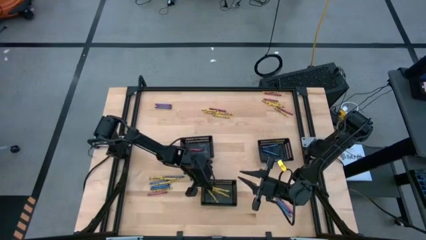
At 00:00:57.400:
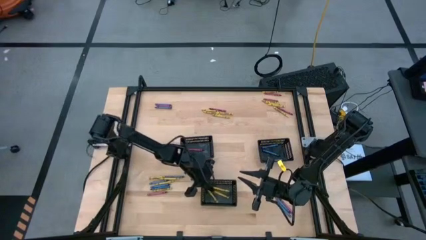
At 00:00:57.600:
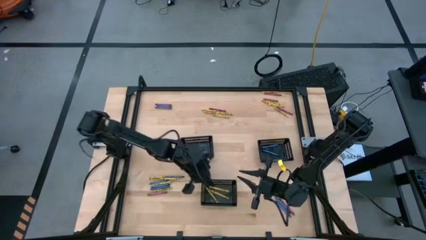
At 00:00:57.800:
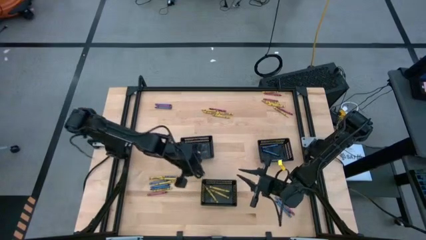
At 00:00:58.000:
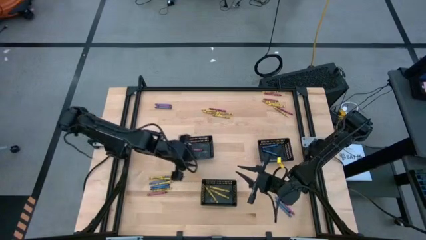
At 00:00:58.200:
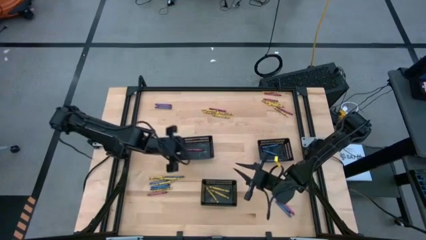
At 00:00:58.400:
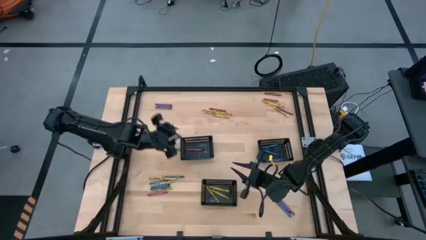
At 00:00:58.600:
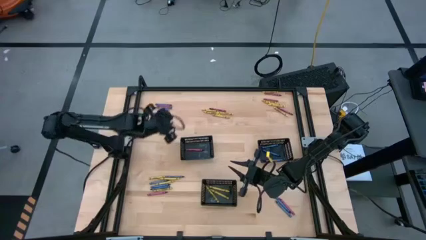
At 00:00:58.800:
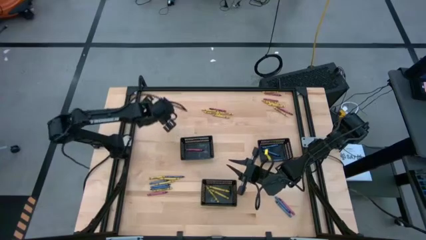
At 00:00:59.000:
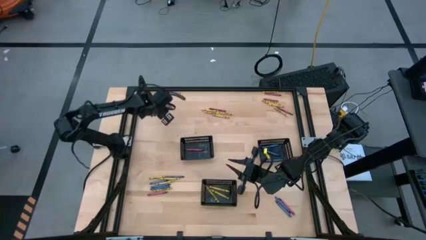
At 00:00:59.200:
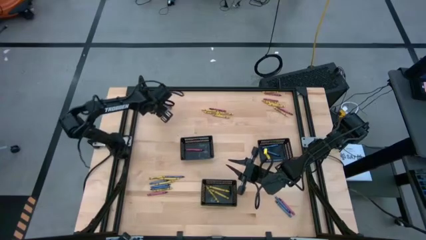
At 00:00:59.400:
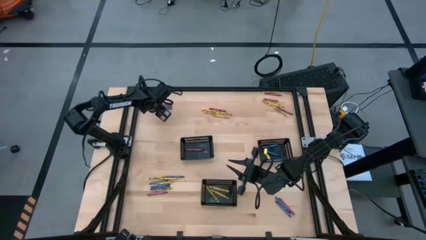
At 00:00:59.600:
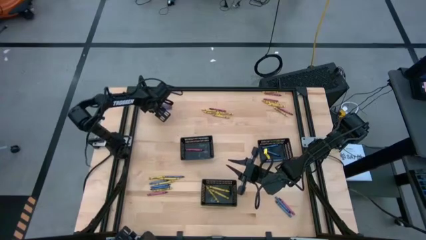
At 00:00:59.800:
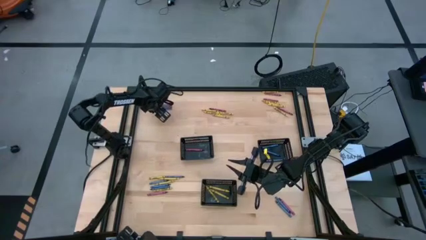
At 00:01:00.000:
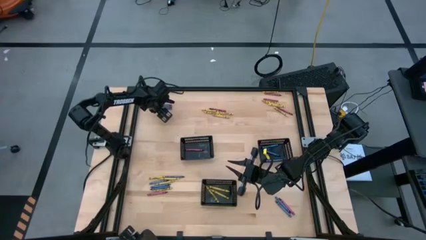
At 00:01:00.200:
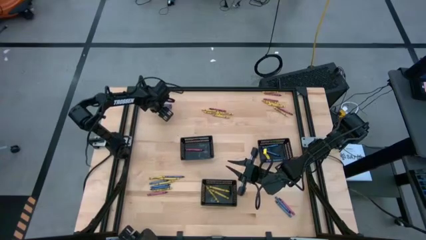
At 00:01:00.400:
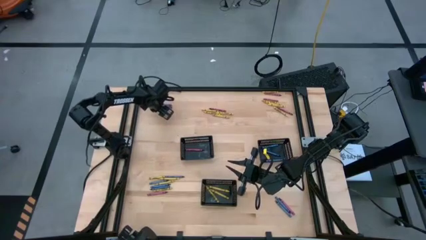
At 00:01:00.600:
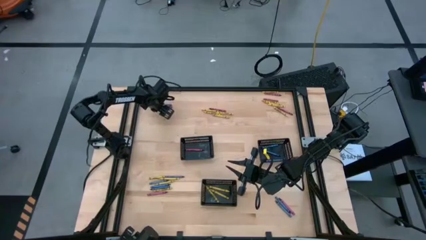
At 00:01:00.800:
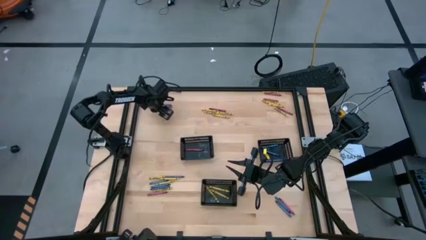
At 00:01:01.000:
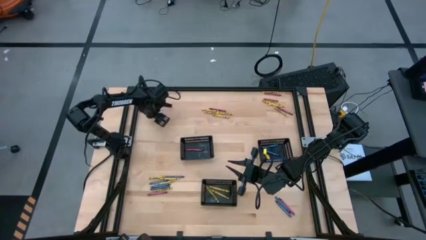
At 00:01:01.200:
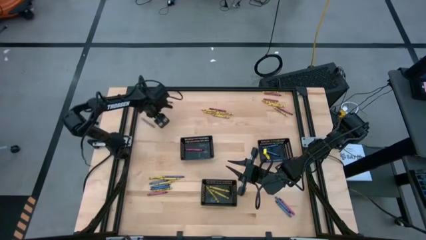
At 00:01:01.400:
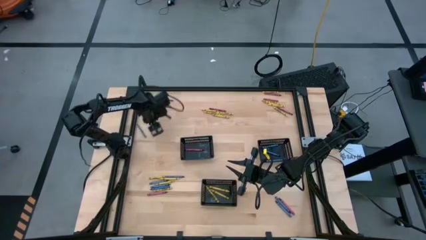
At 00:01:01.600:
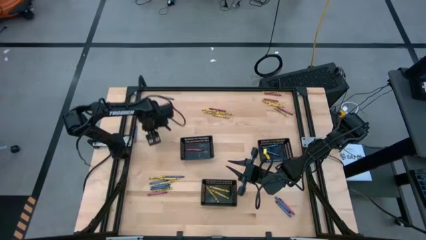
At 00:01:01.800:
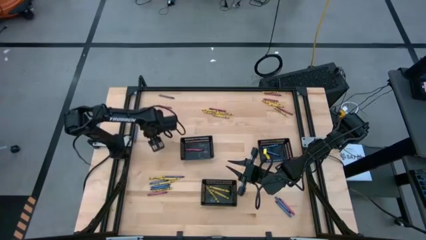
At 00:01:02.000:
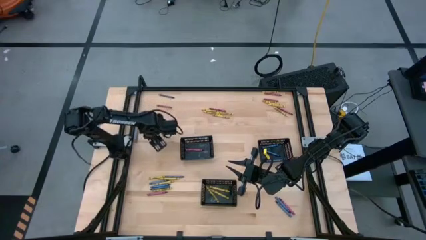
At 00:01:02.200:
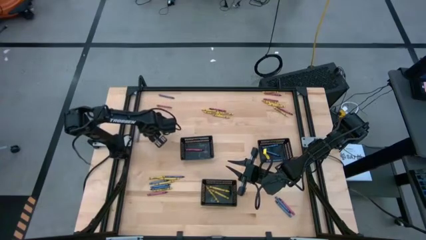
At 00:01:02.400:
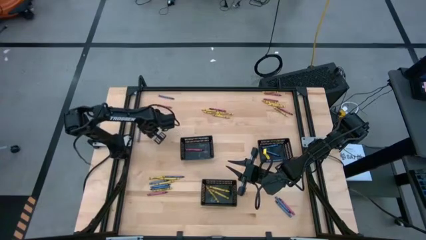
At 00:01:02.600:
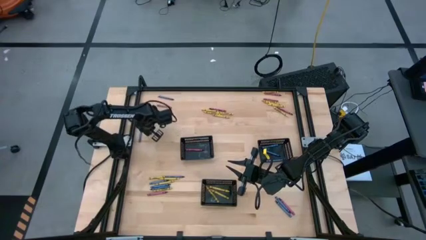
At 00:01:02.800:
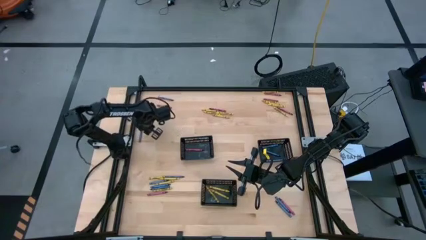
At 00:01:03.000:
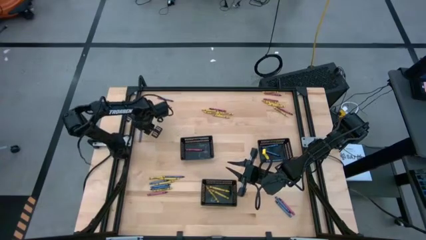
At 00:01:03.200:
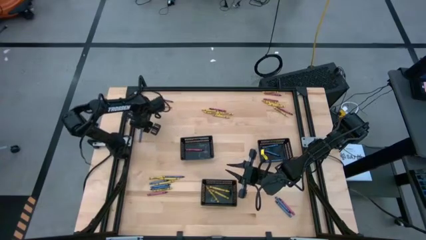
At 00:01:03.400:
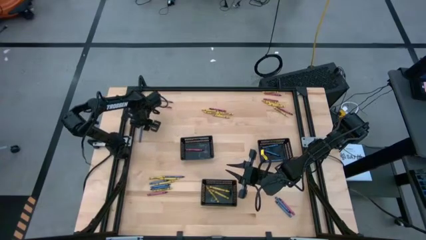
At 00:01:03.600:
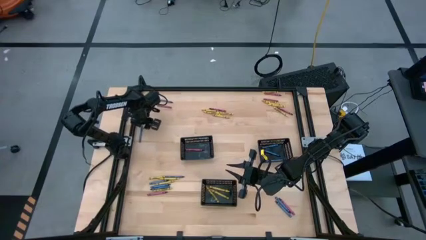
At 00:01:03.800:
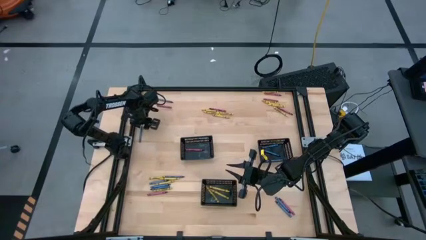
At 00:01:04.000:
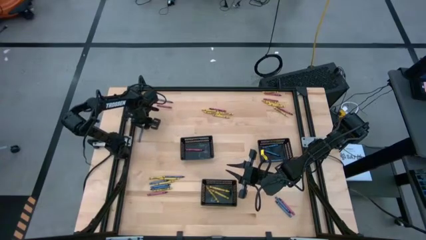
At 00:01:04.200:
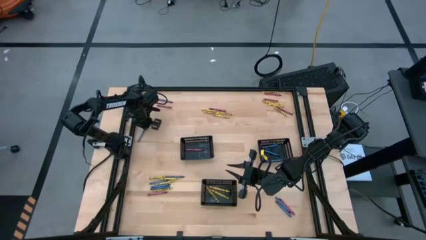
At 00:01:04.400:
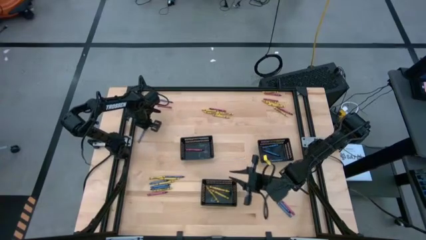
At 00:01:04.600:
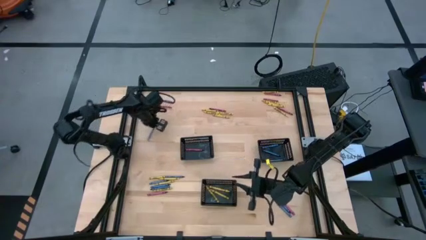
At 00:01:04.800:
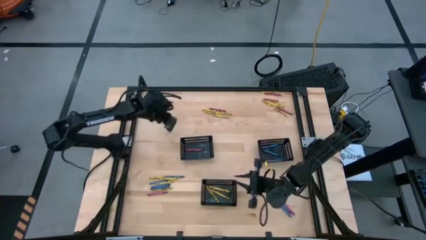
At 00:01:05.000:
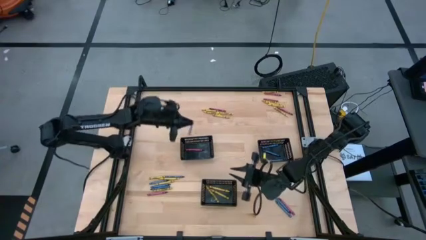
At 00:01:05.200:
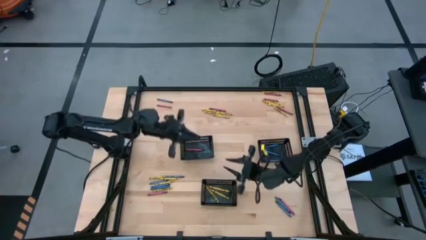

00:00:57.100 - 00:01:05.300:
Task: Sort crayons
Put the blue crayon into the right black bin

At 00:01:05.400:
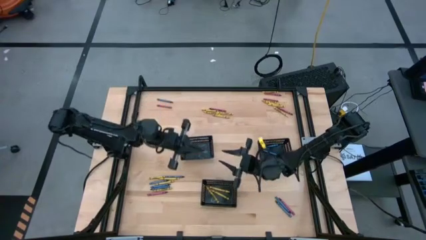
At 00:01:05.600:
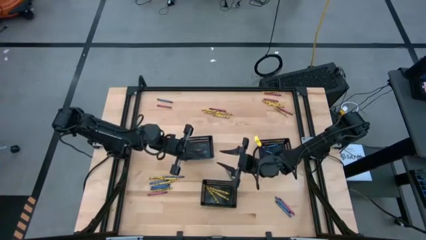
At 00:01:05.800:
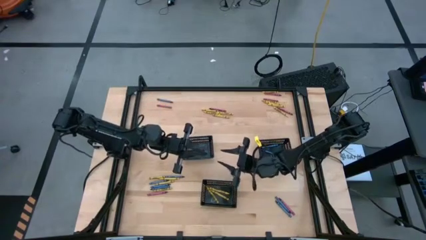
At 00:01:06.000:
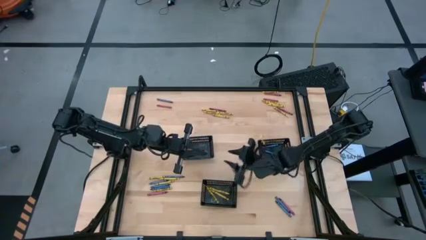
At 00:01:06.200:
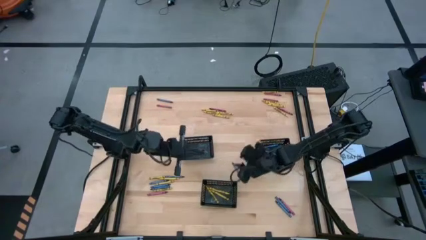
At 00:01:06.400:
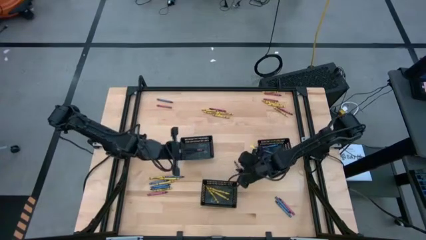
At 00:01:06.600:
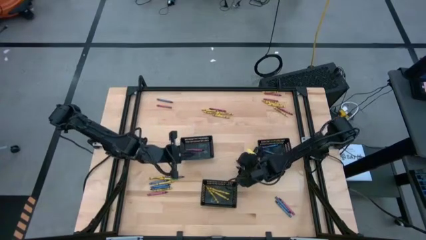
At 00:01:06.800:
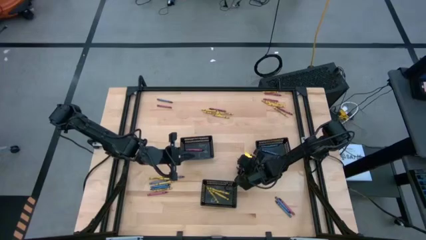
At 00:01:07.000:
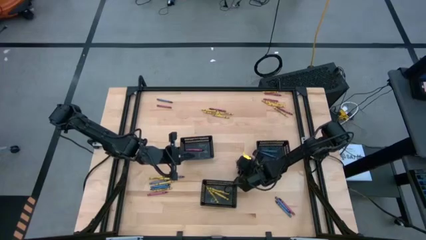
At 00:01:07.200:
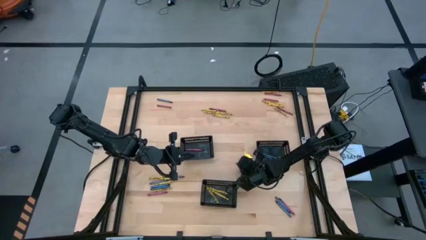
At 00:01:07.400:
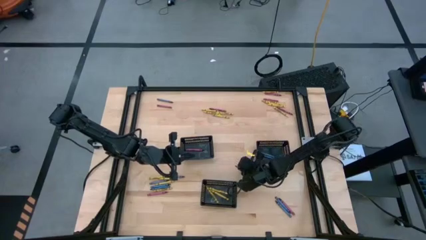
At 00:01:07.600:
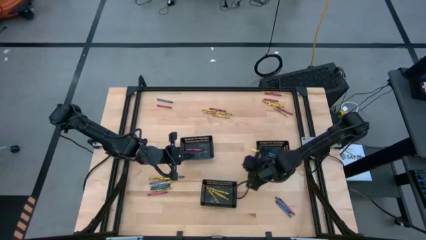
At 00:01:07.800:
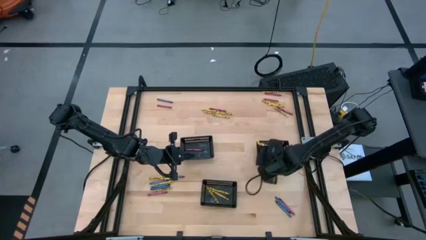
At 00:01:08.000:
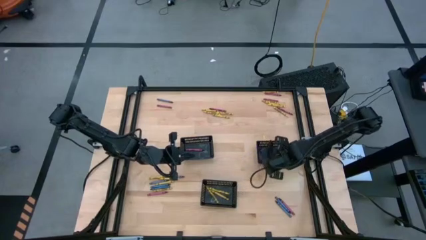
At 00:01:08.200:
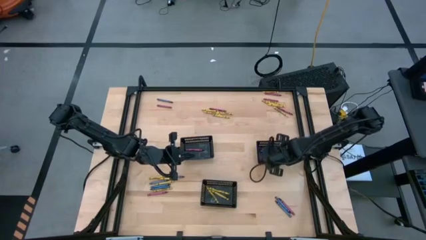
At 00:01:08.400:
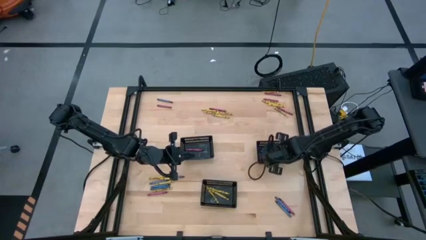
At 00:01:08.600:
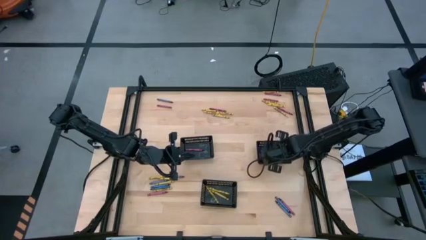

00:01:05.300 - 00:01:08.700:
Put the blue crayon into the right black bin

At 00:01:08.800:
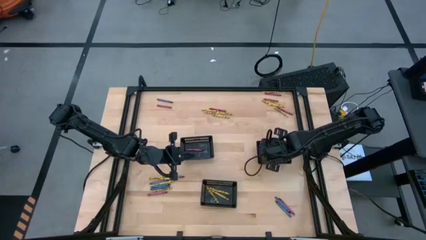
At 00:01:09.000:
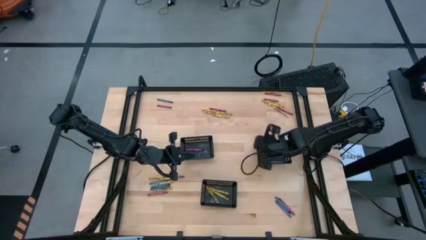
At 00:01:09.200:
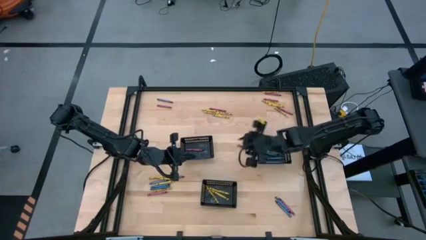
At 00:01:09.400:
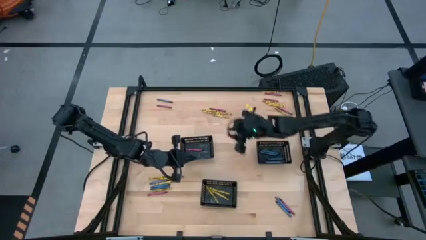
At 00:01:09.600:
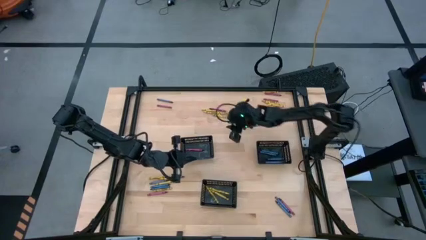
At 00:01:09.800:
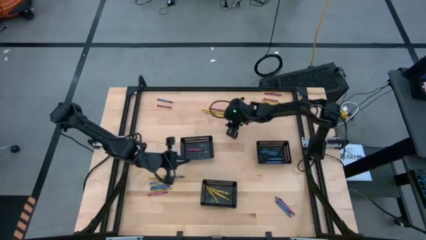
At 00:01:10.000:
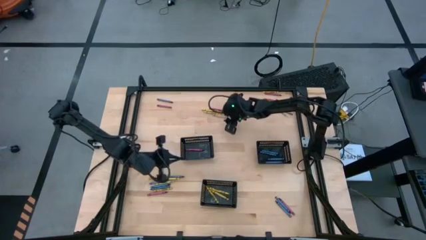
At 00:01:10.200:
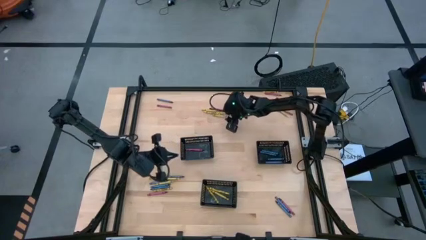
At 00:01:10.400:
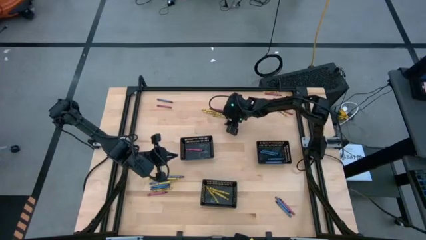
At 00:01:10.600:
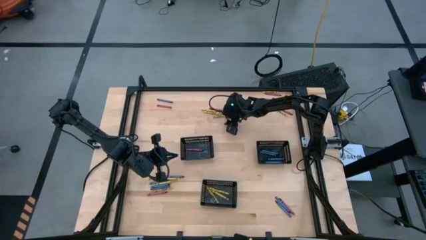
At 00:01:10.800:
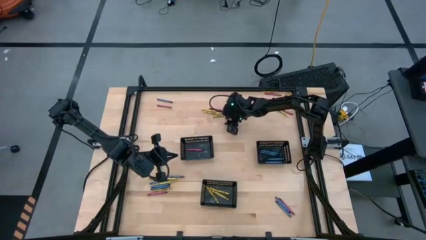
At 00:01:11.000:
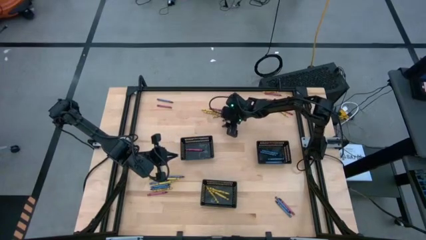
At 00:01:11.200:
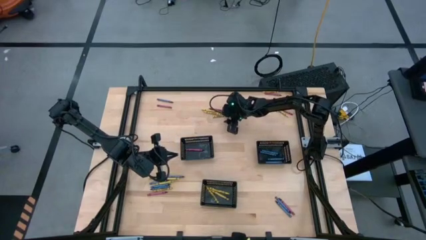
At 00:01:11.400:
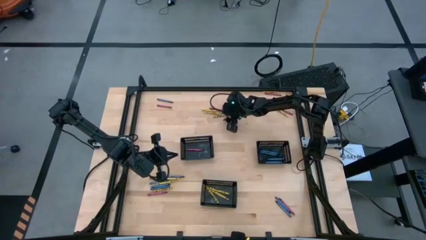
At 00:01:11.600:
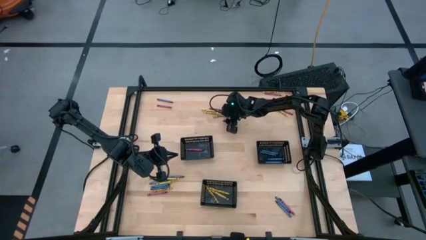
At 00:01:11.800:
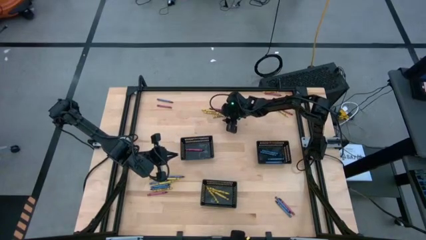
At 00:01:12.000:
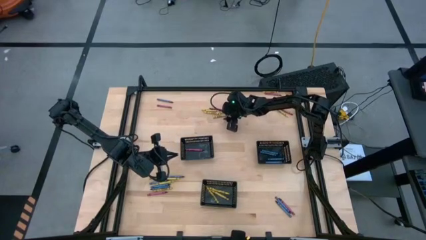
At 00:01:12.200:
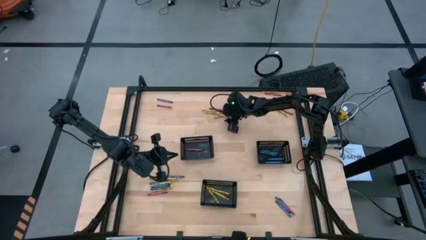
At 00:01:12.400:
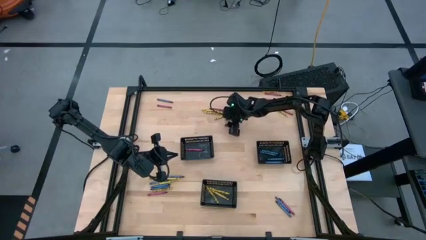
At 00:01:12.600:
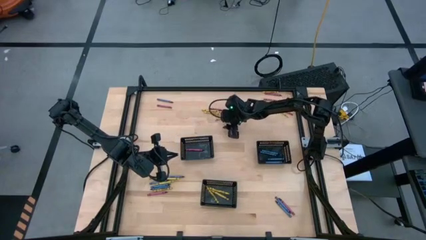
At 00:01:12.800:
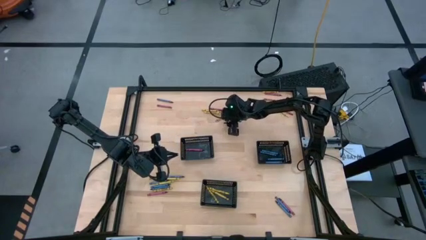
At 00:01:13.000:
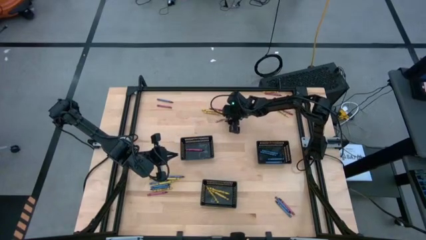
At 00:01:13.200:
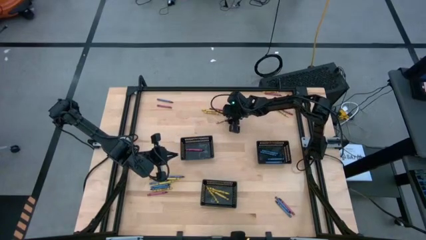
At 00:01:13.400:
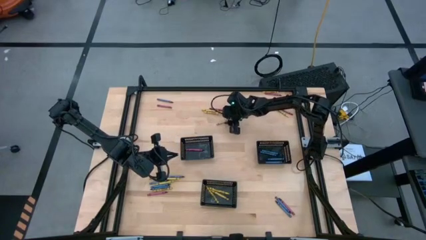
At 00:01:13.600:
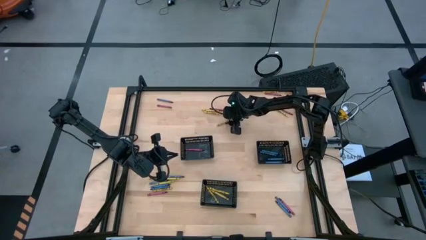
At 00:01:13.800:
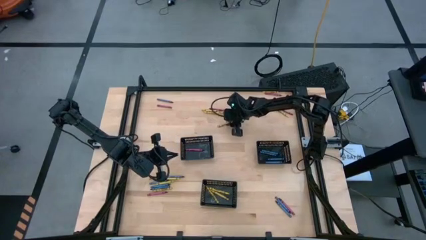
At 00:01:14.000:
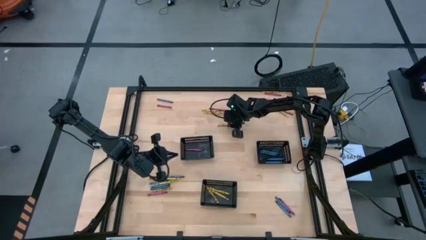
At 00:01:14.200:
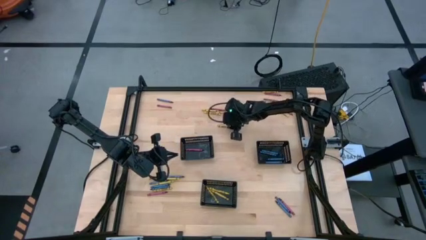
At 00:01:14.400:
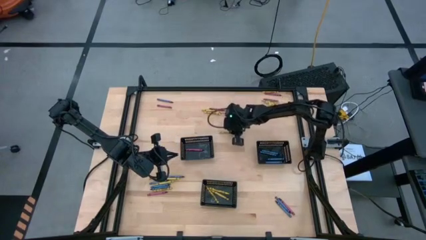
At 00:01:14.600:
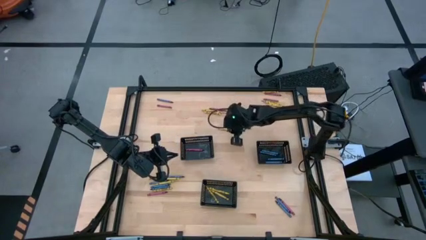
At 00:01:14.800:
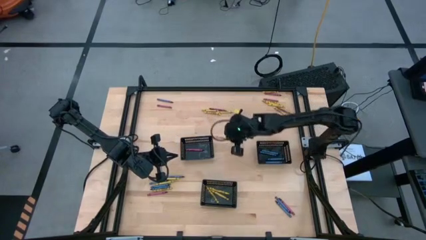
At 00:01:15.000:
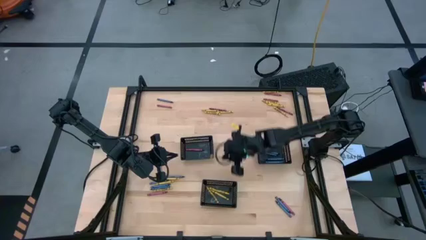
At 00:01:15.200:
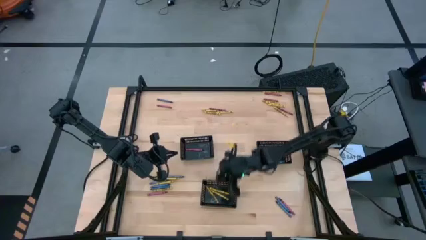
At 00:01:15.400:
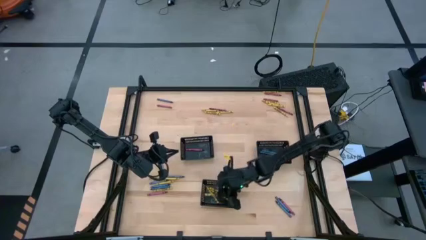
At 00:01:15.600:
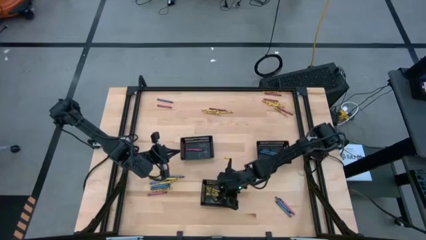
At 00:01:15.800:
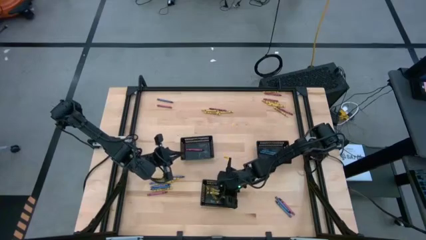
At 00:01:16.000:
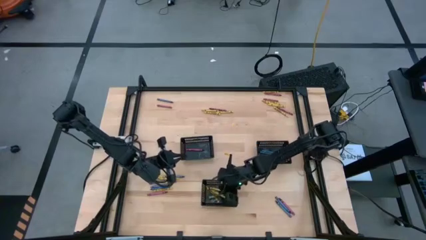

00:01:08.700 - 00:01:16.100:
Put the yellow crayon into the bottom black bin
